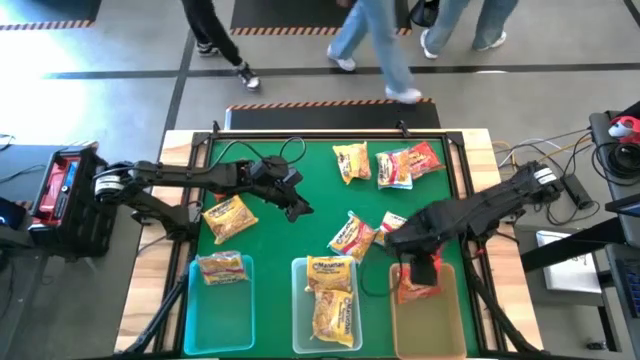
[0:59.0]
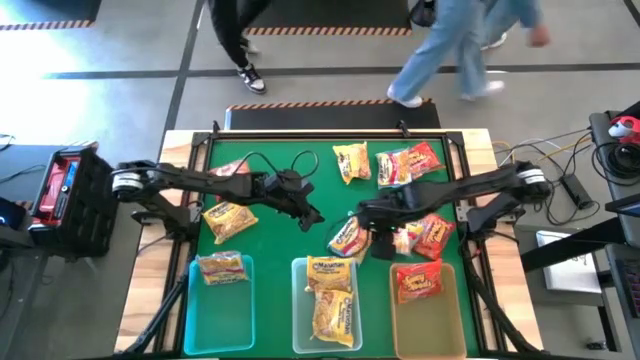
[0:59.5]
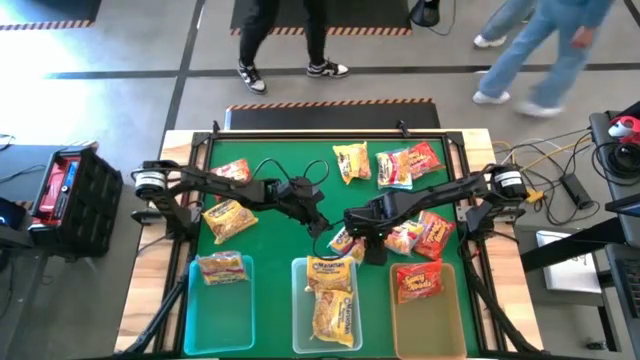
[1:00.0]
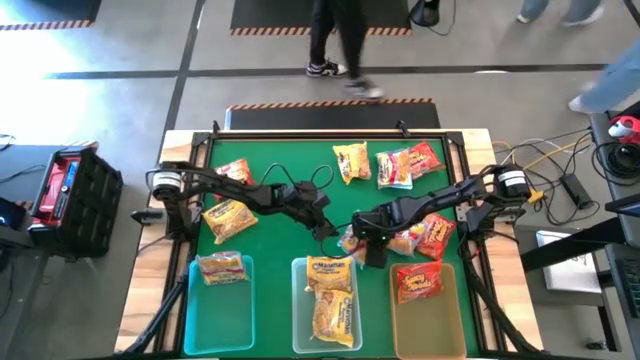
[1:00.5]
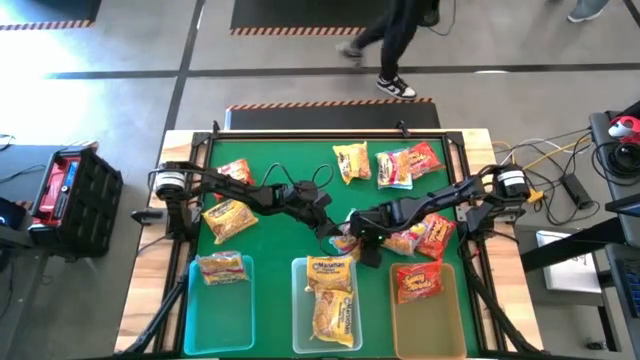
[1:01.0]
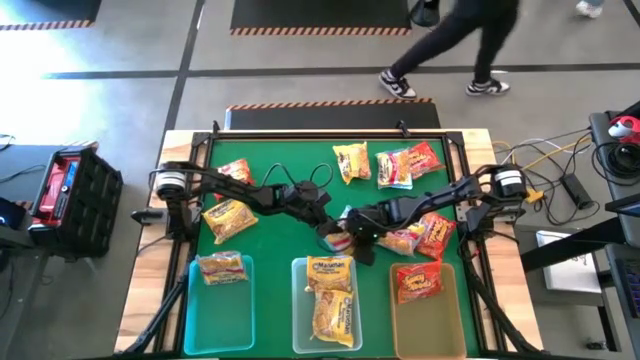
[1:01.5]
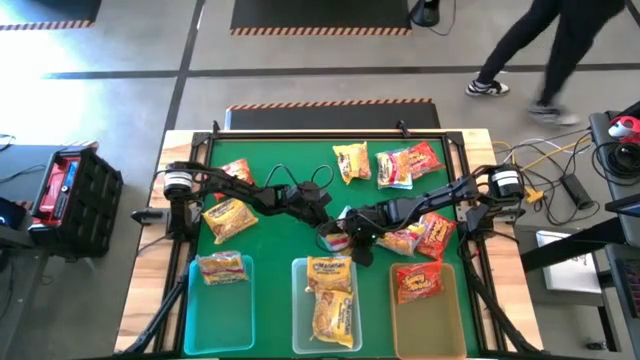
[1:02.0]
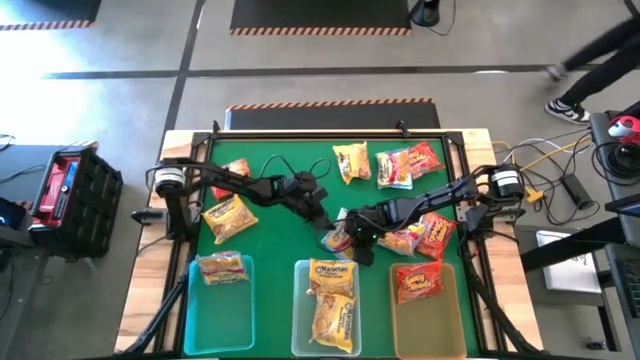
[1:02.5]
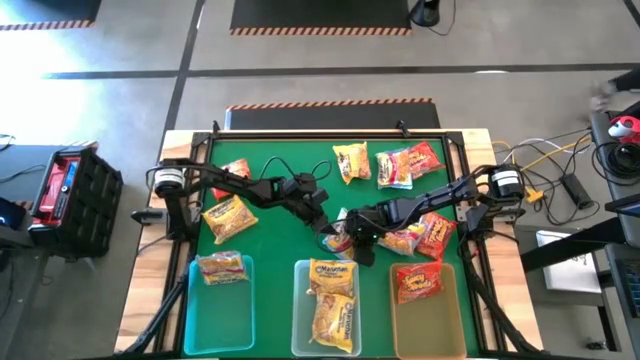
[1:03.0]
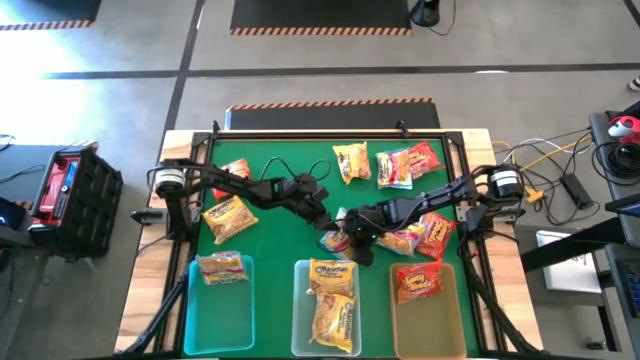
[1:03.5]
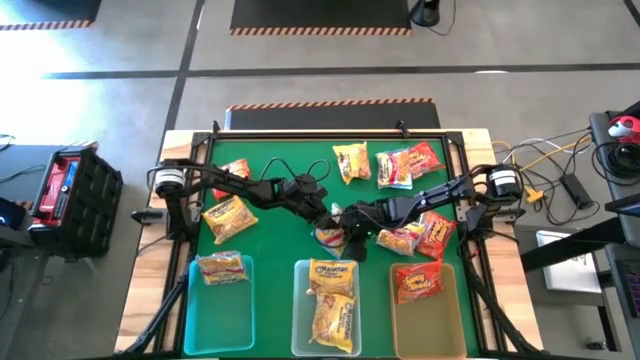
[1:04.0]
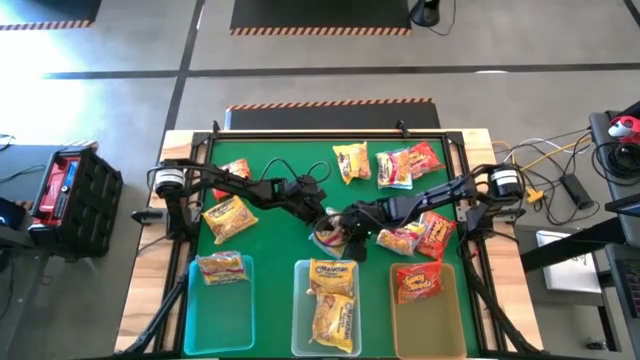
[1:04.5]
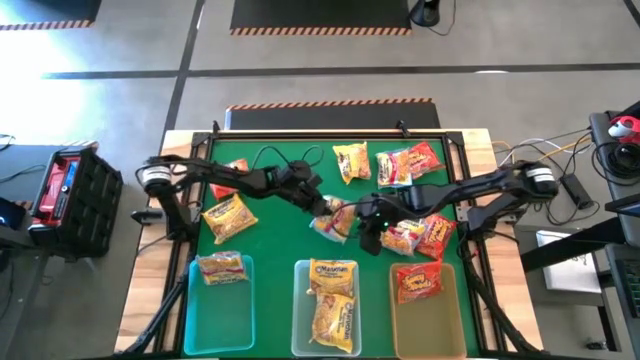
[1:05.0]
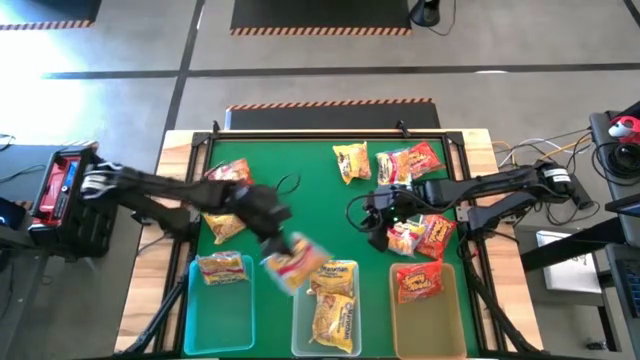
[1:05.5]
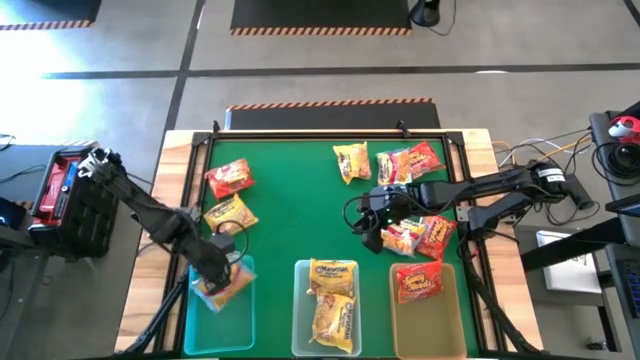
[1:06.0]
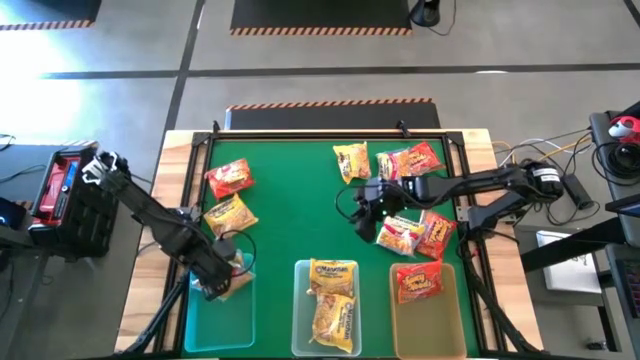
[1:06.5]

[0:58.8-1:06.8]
Task: Sort Maruchan noodles
Put the blue noodle pack into the blue bin

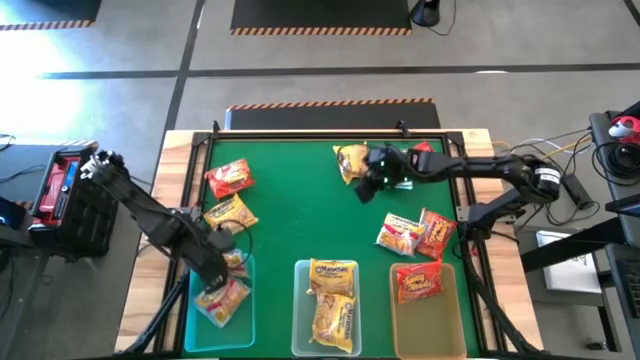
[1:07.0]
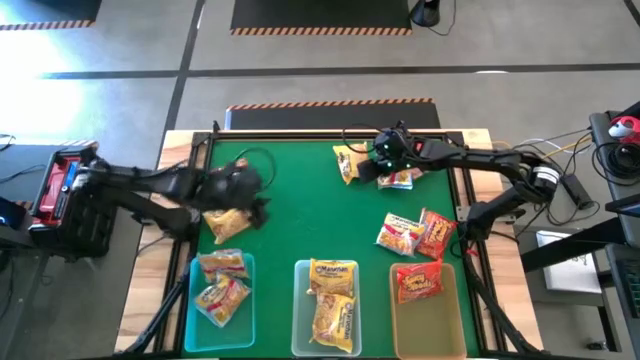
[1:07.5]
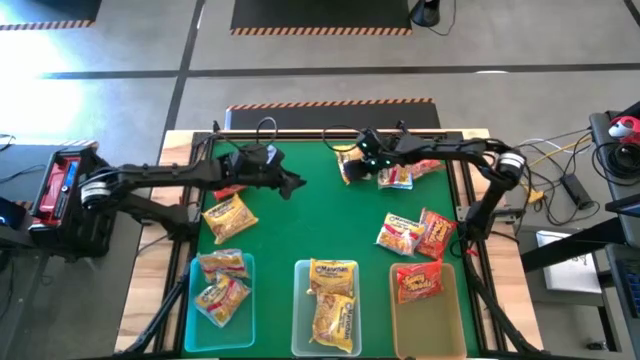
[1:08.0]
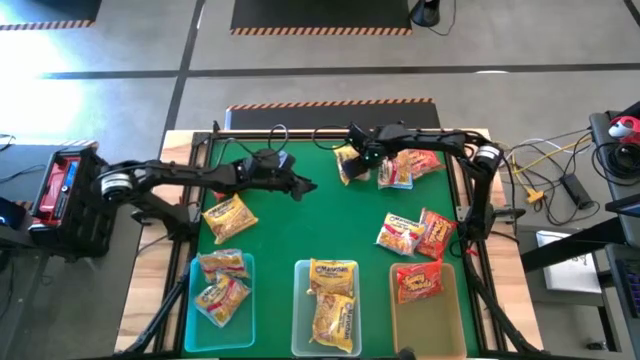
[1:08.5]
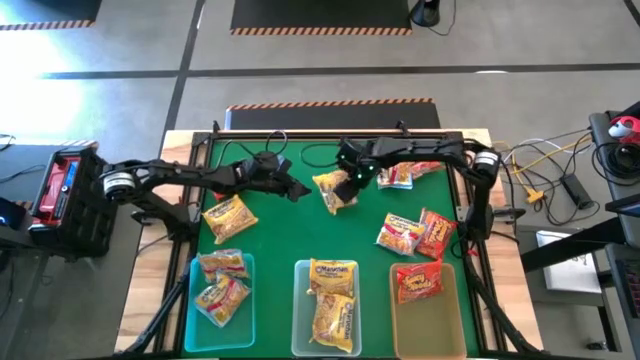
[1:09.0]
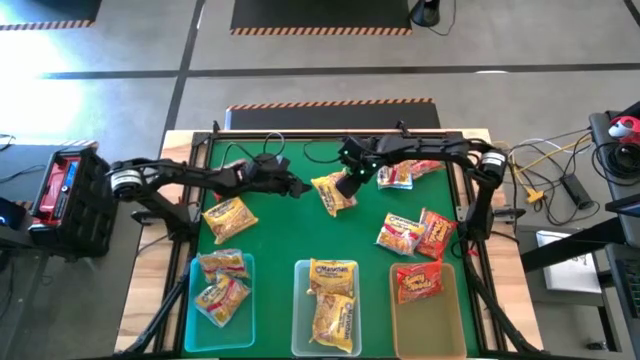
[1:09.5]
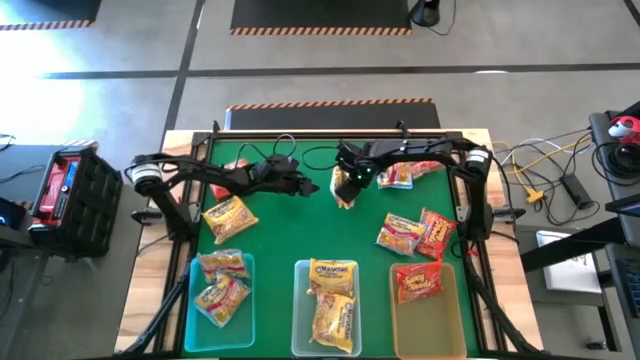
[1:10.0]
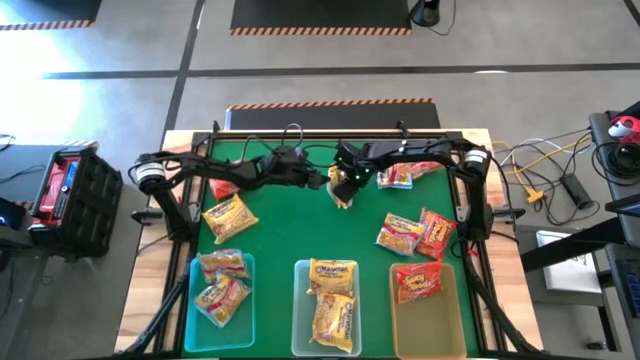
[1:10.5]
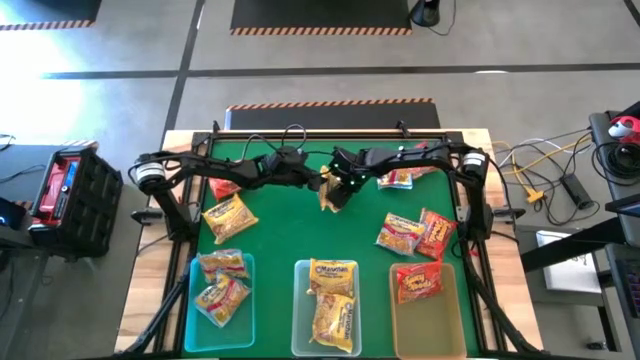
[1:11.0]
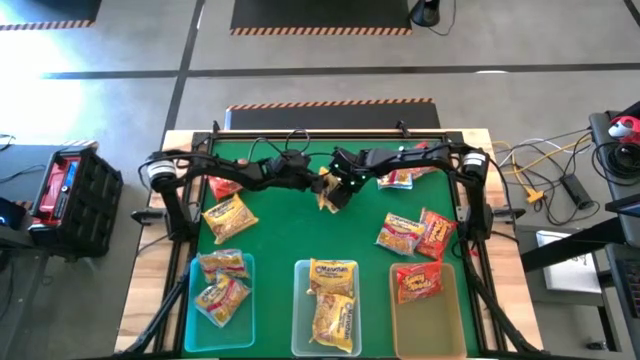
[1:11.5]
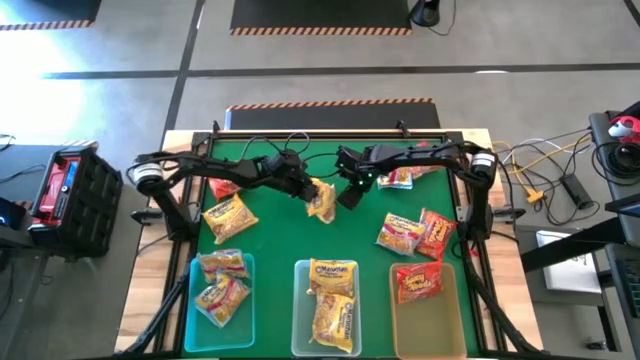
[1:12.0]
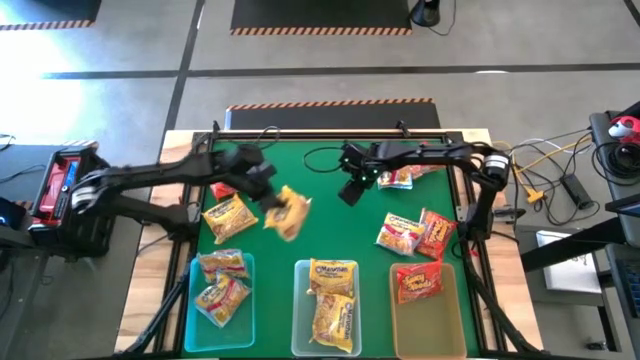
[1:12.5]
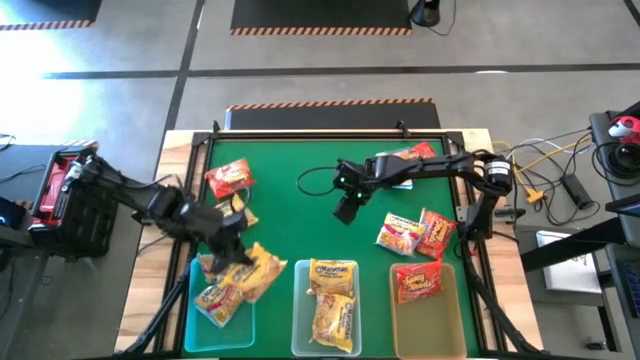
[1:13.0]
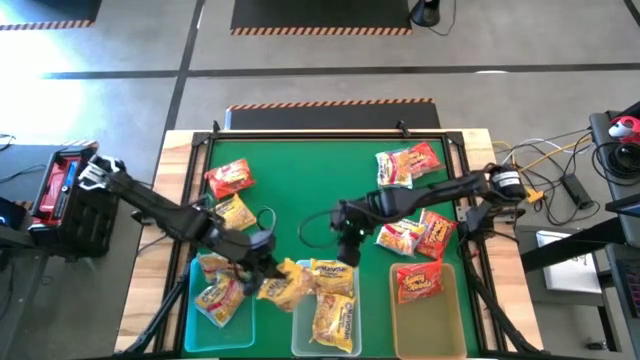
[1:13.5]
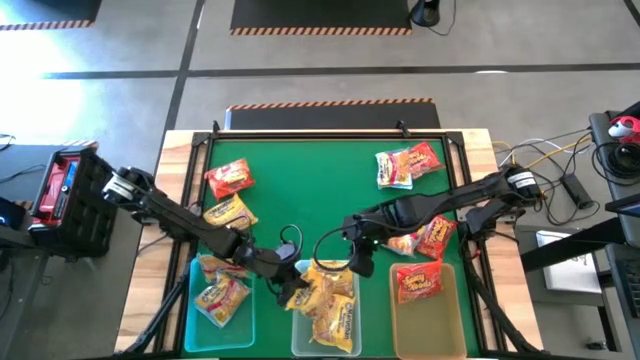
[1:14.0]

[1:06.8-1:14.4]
Put the yellow noodle pack into the transparent bin
